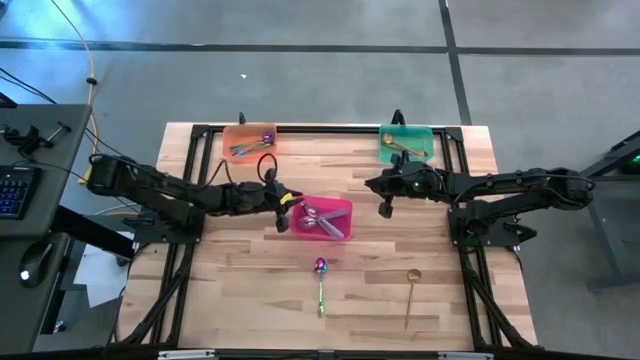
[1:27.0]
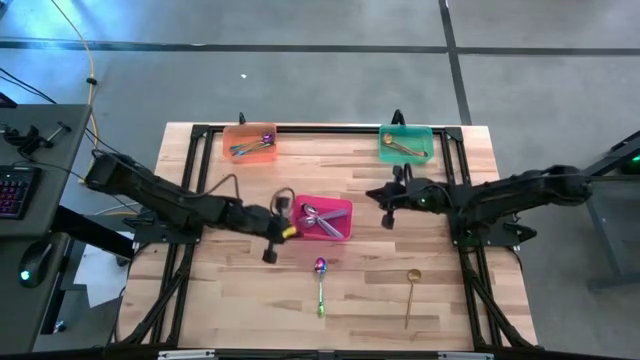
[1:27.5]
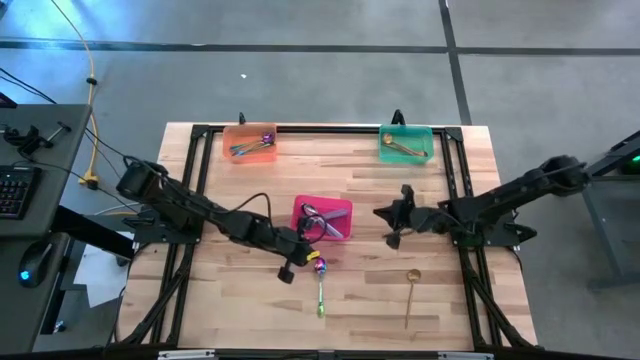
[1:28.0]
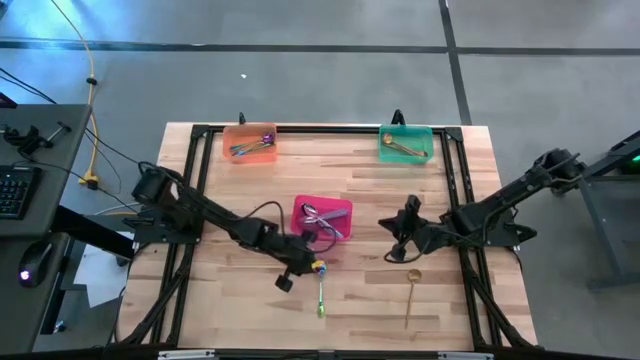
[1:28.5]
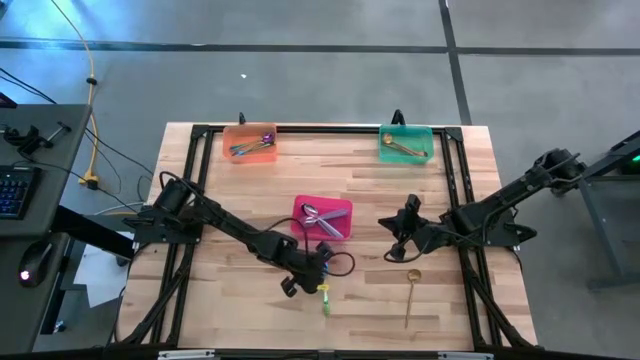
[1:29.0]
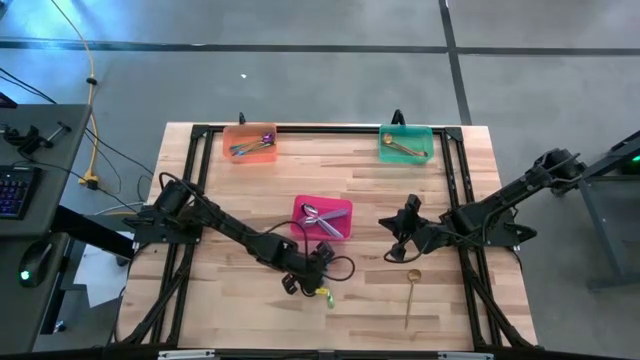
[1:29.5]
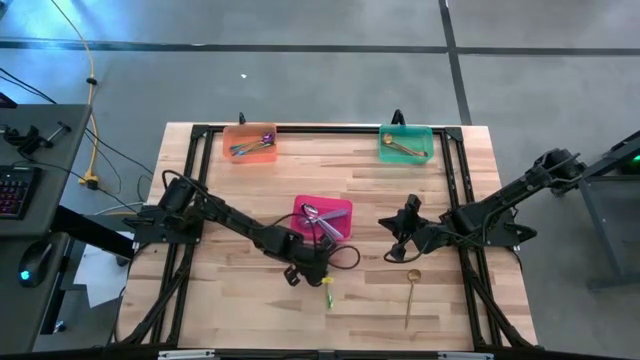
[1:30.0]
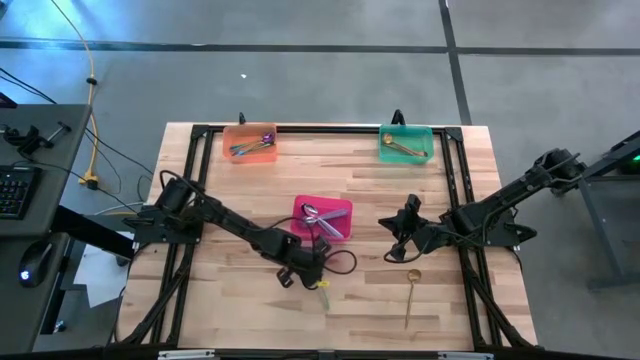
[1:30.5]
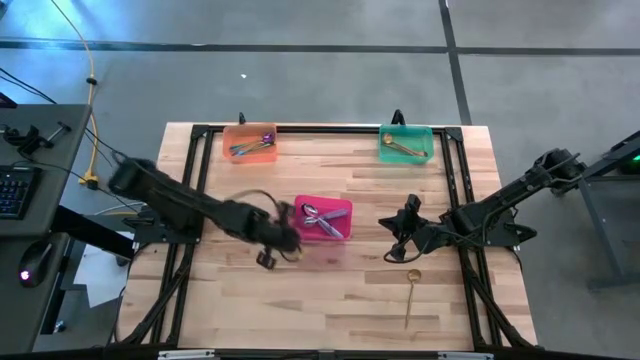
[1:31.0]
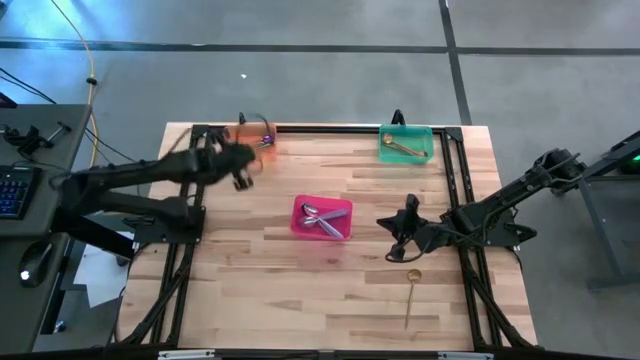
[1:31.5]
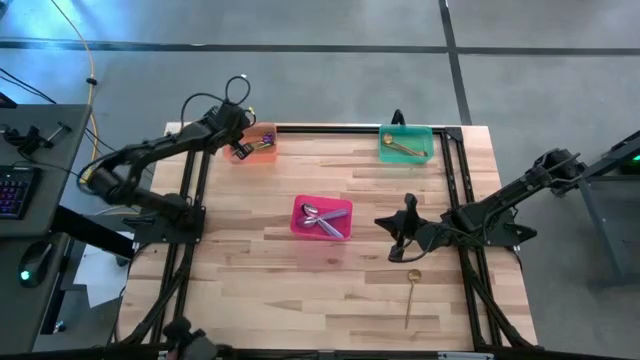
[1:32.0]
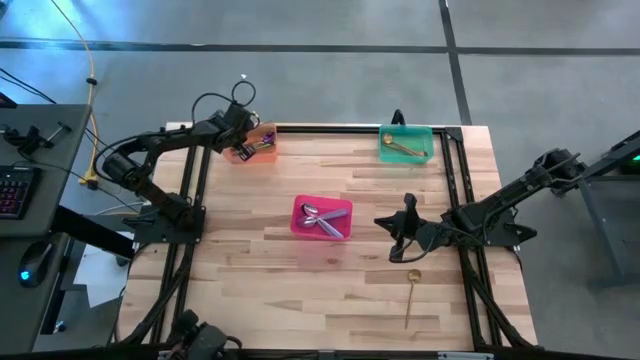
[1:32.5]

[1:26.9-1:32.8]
Task: Sort silverware by color (type)
Put the green spoon into the orange bin

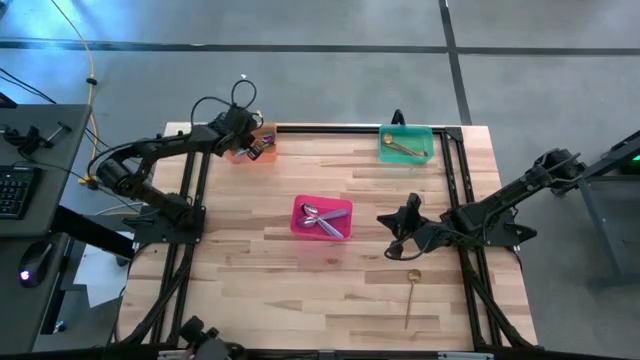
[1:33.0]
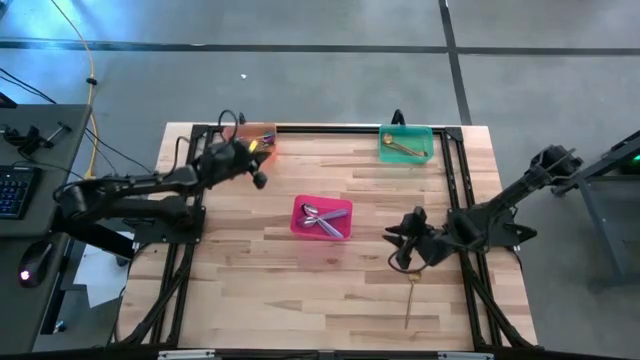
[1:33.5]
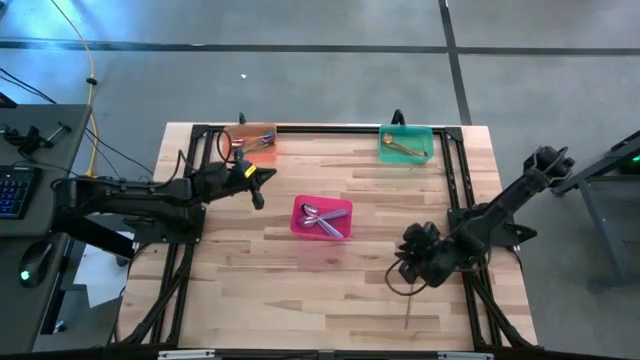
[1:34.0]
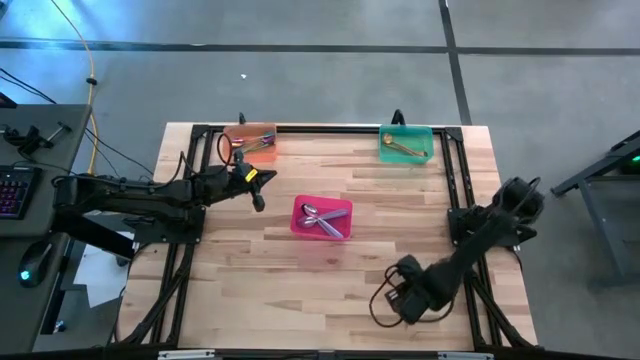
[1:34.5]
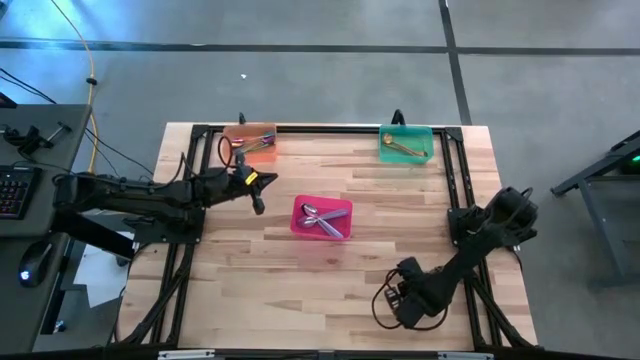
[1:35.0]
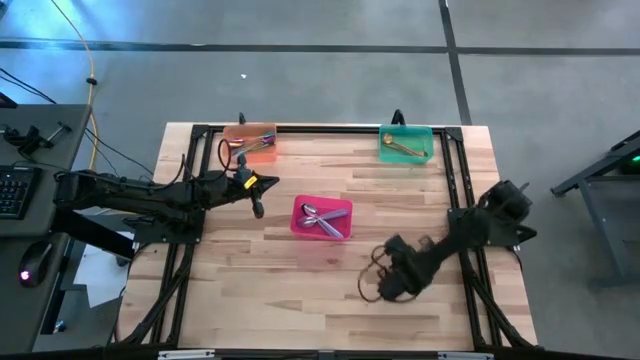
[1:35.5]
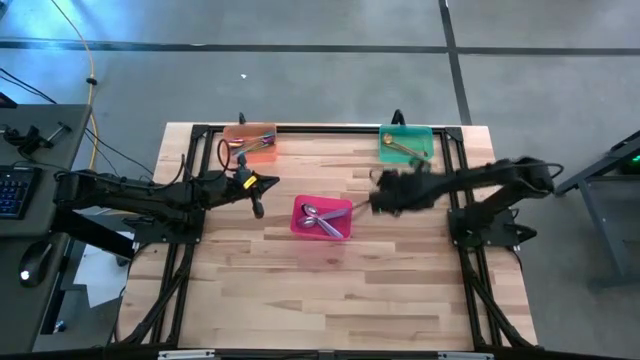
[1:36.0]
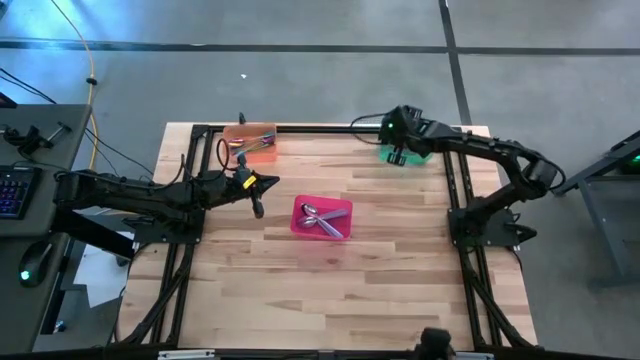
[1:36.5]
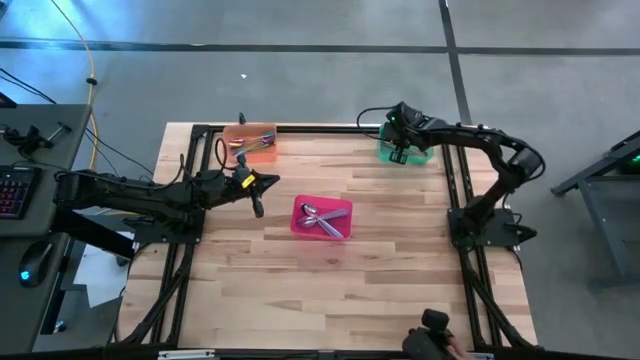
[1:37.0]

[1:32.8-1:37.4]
Put the gold spoon into the green bin

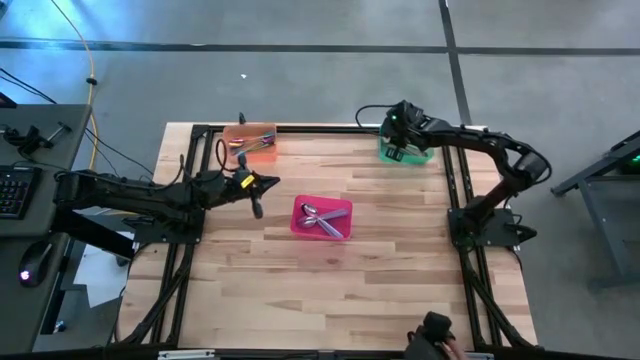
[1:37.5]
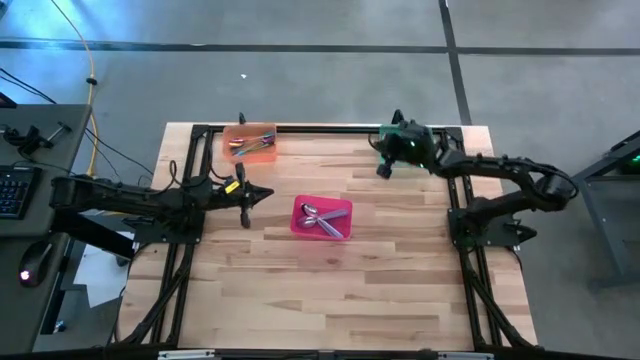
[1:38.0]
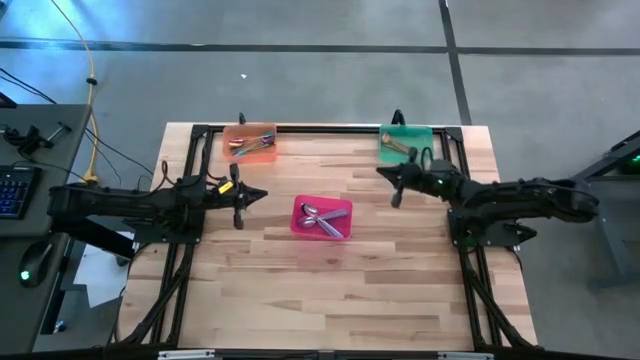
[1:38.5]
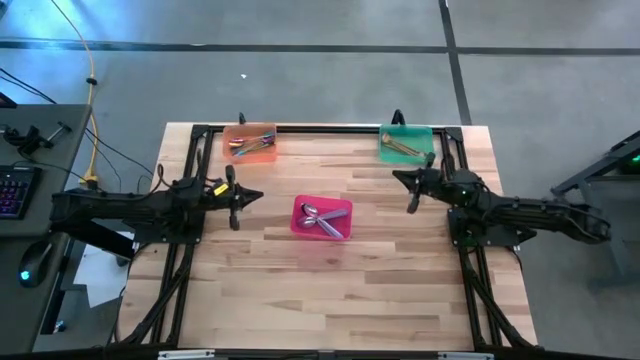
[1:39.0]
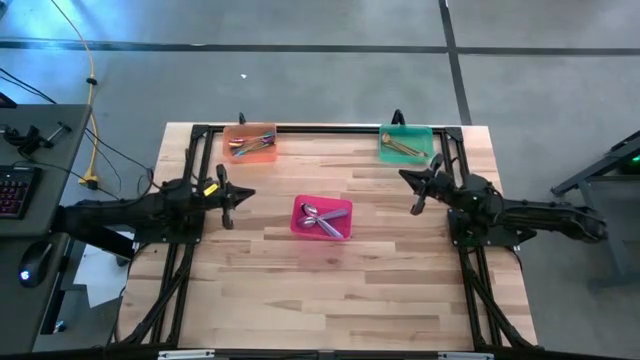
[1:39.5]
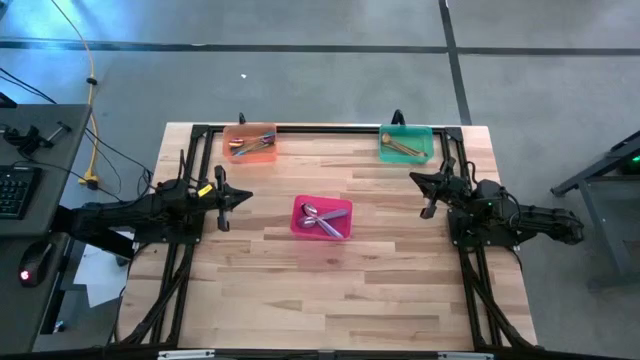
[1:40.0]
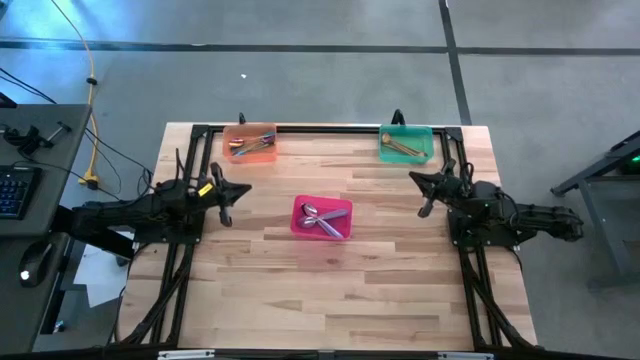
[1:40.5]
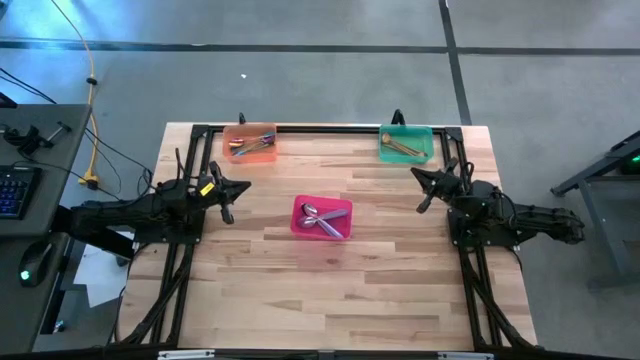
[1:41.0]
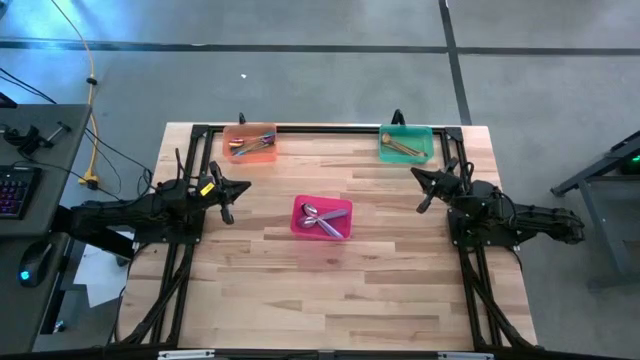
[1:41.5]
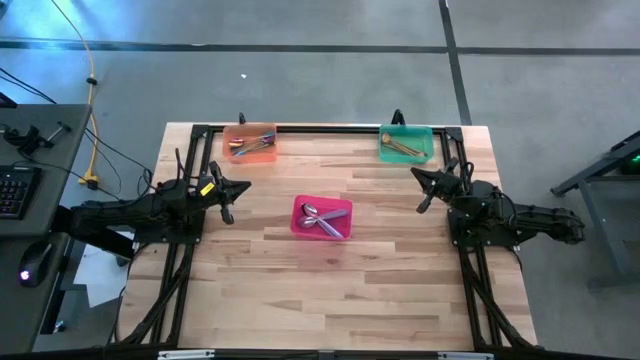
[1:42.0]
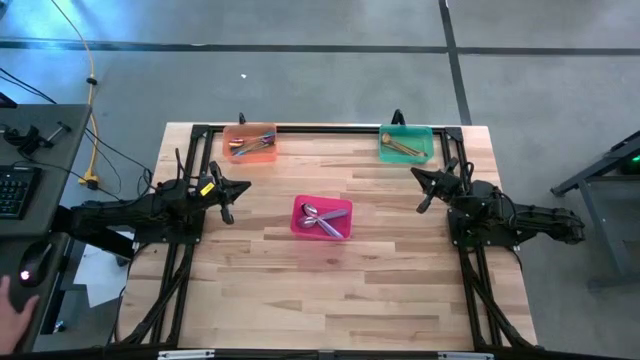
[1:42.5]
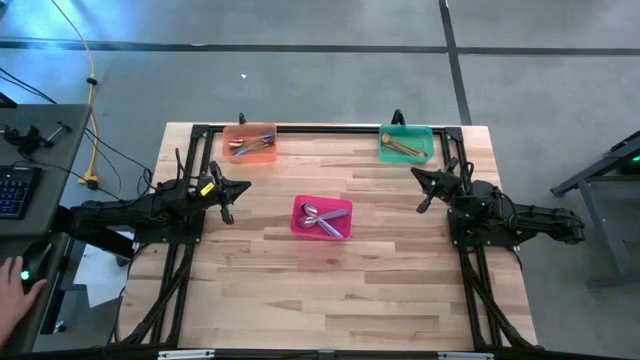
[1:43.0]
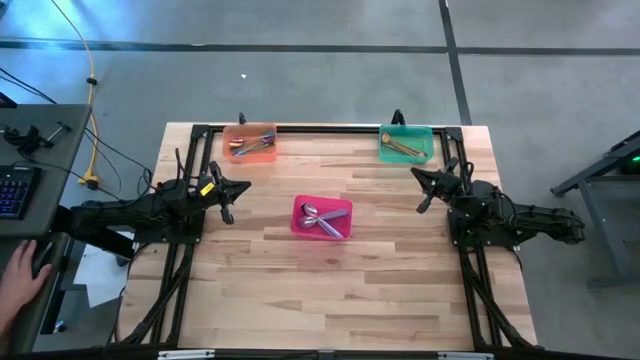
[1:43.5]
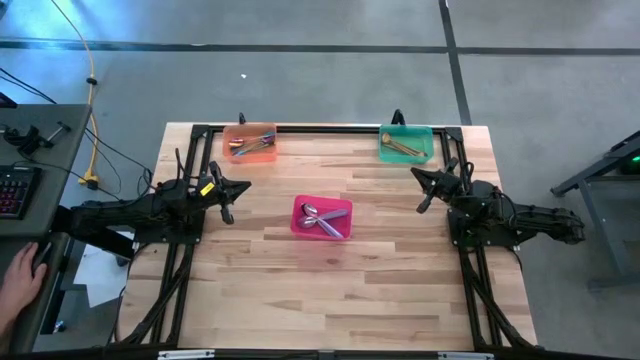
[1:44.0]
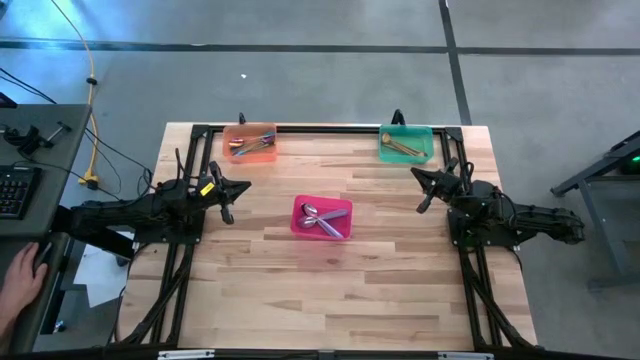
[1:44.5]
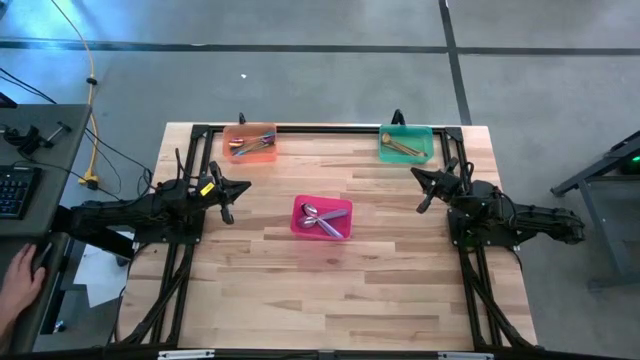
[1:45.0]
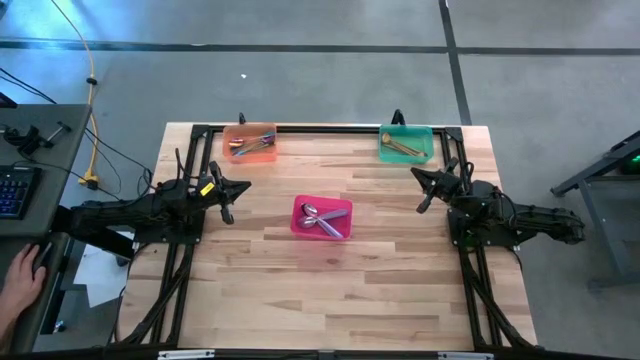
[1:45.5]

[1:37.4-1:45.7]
Return to Home Position

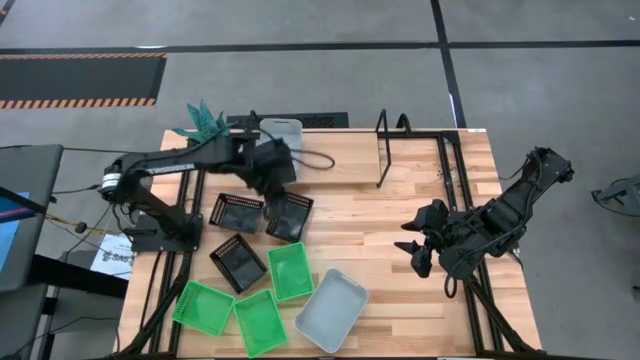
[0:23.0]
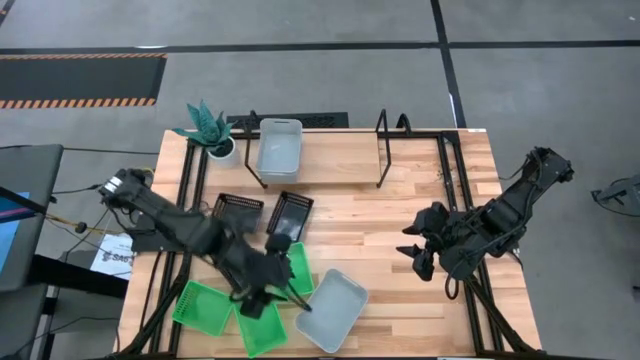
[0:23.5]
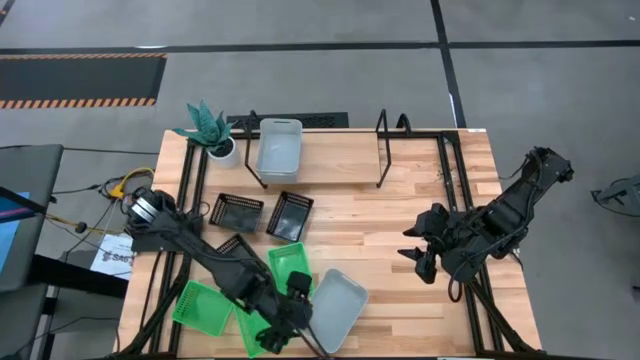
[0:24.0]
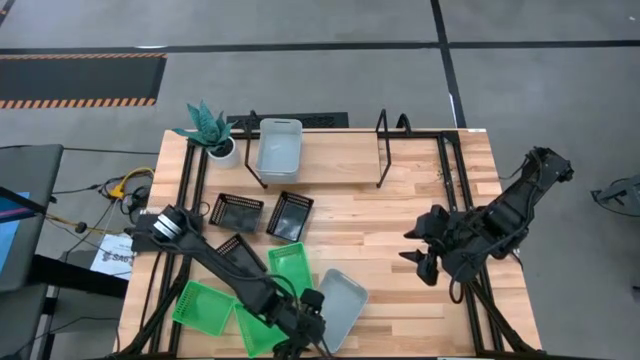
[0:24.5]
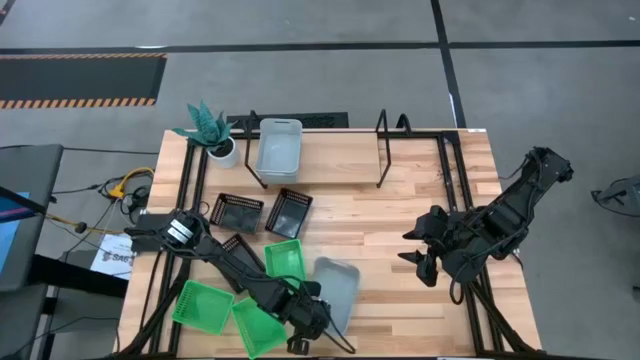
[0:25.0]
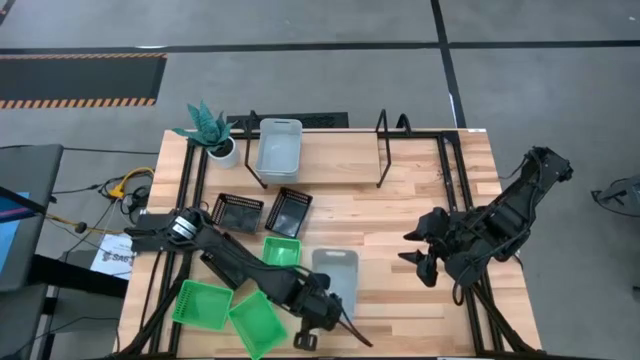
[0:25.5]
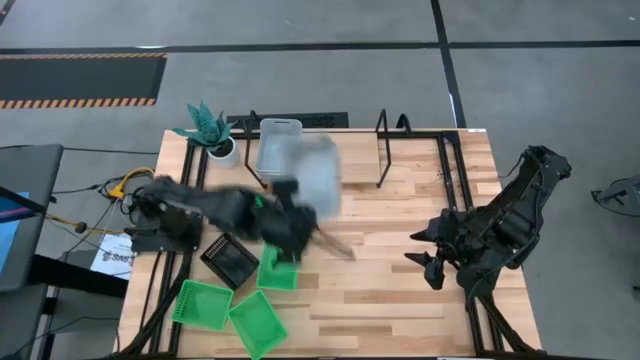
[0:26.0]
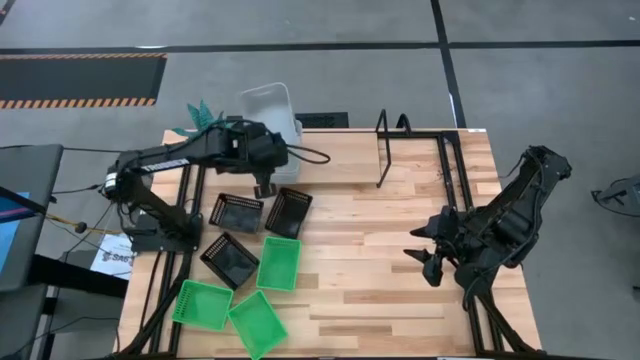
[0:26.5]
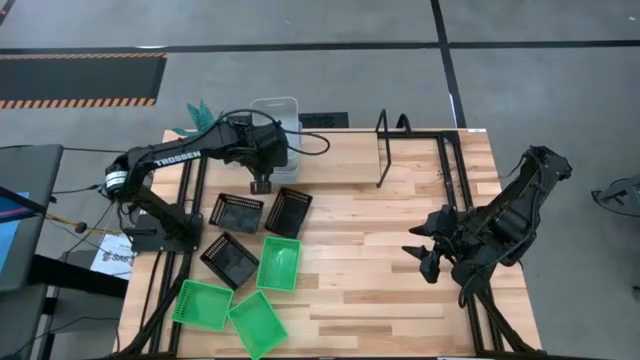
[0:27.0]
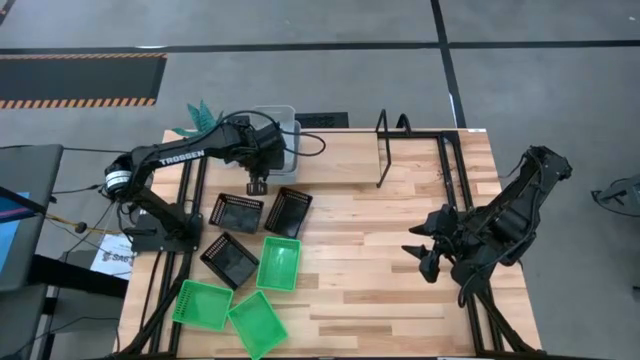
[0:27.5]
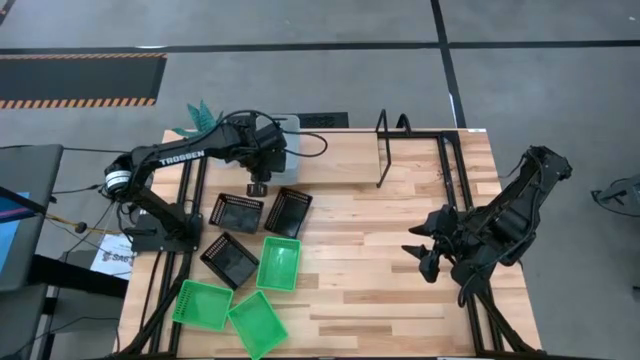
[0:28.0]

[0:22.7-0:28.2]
Task: Stack baskets on shelf by color
Stack the gray bin on top of the gray bin on the shelf
